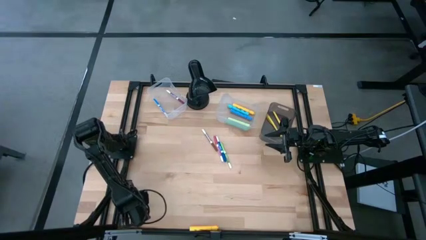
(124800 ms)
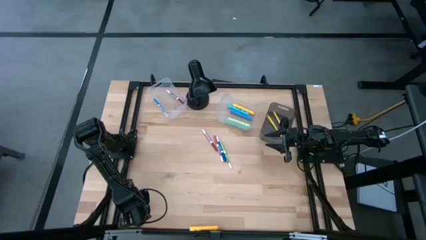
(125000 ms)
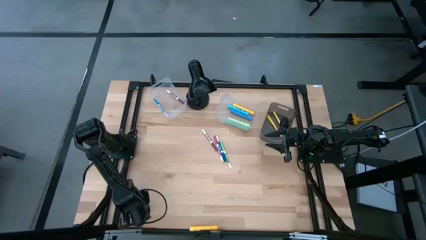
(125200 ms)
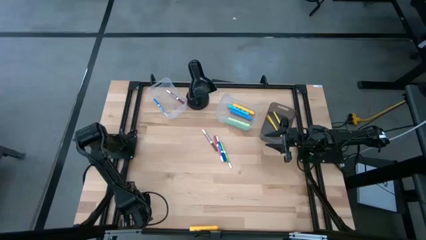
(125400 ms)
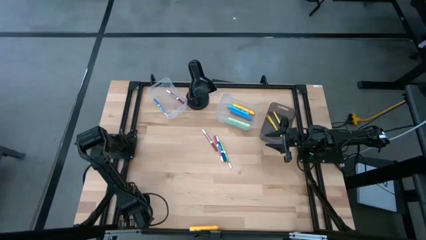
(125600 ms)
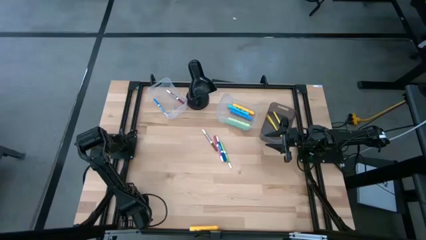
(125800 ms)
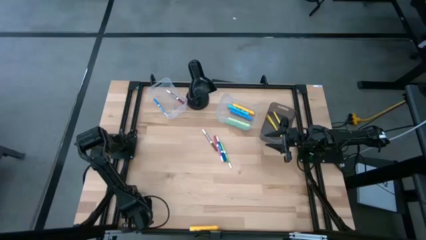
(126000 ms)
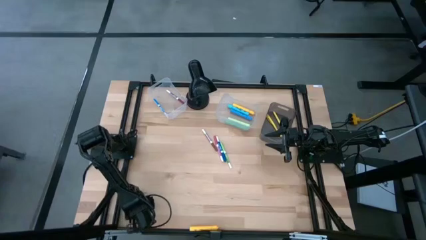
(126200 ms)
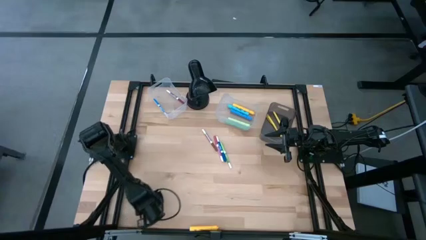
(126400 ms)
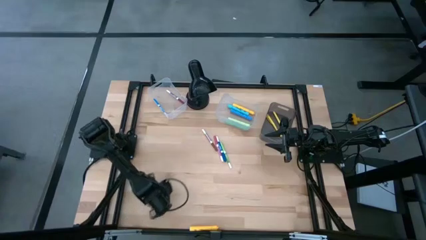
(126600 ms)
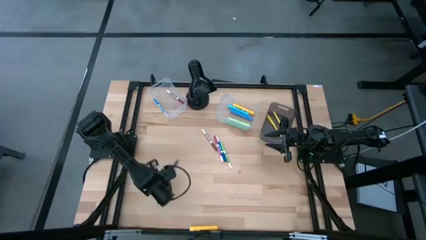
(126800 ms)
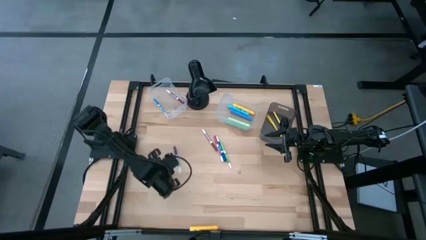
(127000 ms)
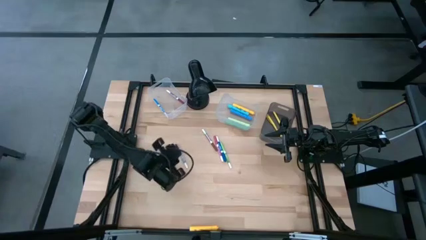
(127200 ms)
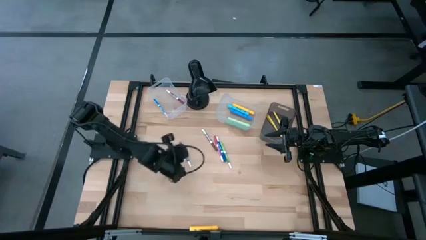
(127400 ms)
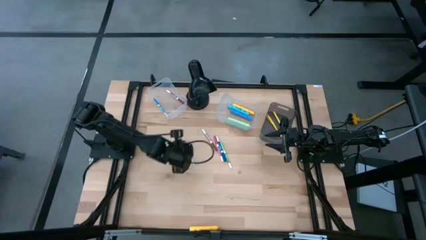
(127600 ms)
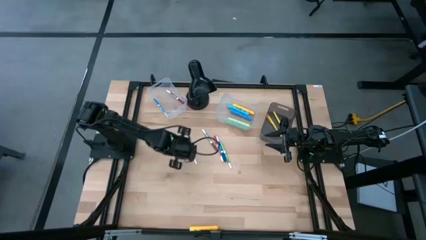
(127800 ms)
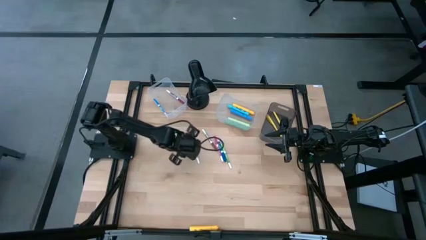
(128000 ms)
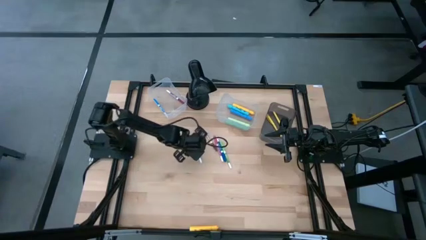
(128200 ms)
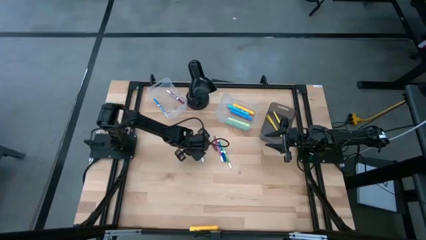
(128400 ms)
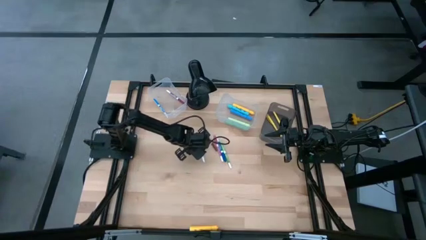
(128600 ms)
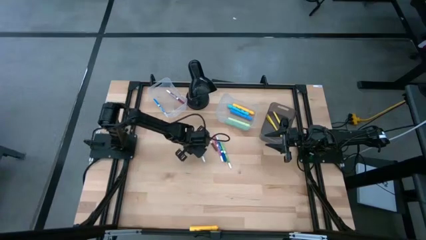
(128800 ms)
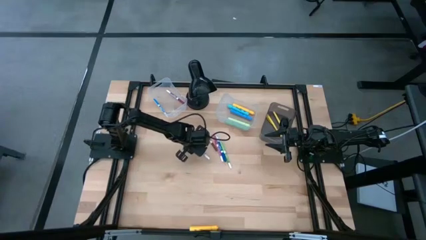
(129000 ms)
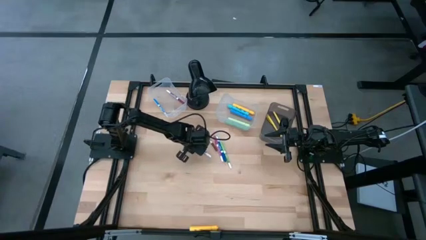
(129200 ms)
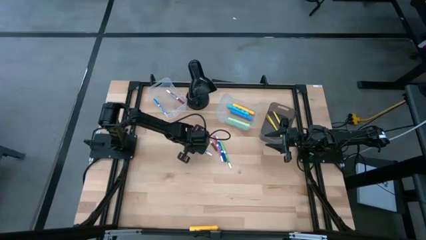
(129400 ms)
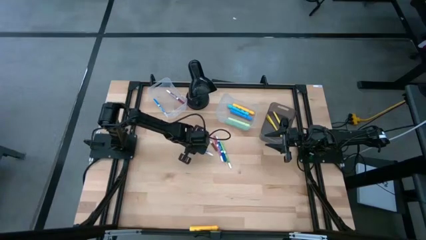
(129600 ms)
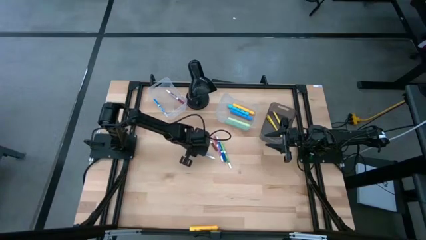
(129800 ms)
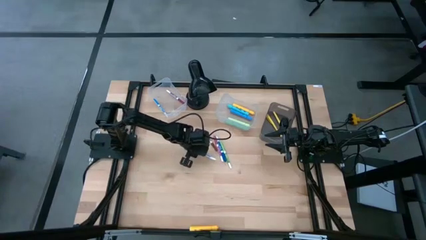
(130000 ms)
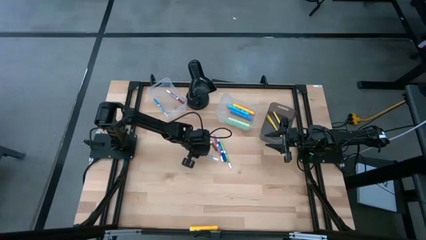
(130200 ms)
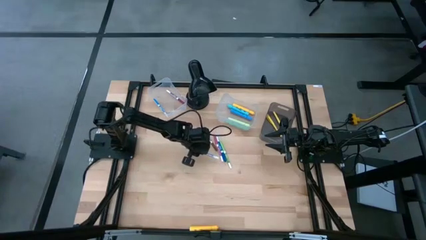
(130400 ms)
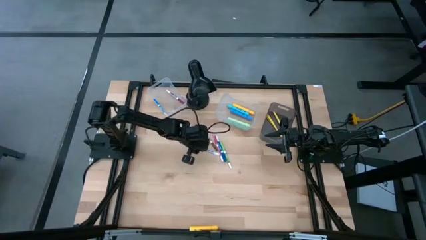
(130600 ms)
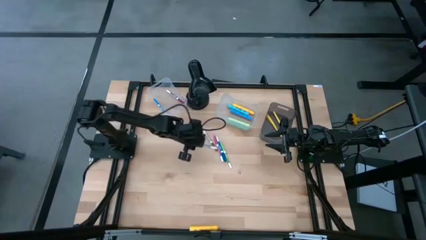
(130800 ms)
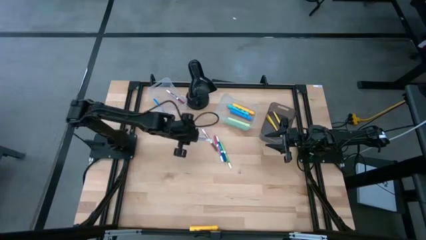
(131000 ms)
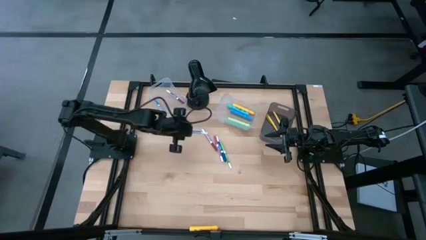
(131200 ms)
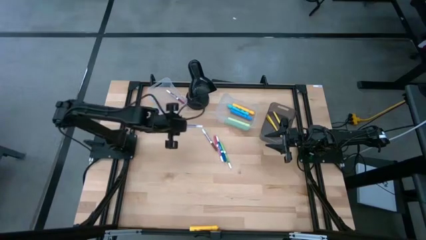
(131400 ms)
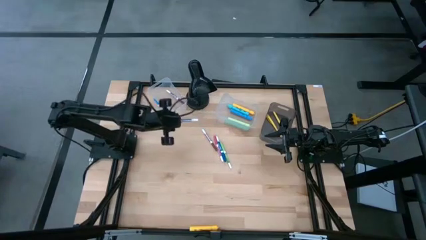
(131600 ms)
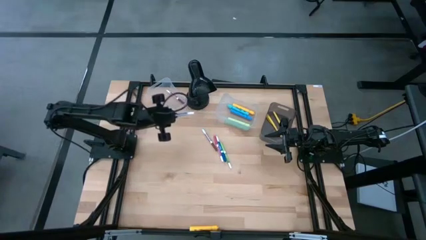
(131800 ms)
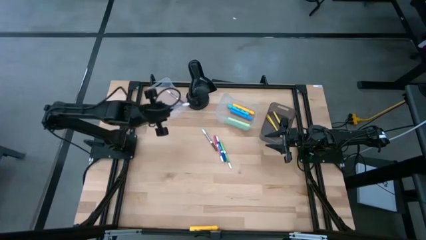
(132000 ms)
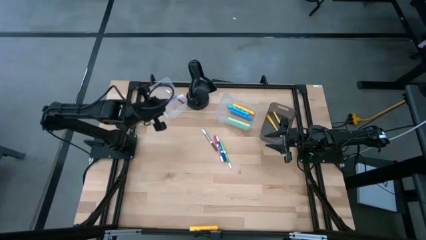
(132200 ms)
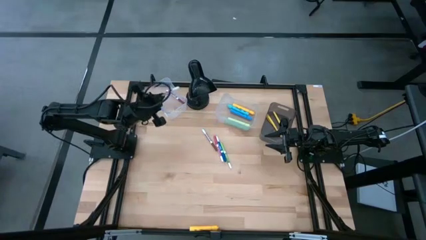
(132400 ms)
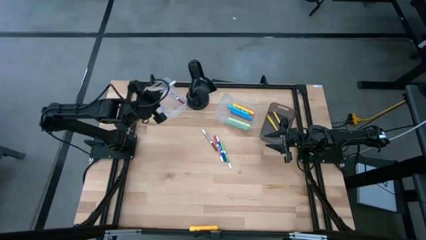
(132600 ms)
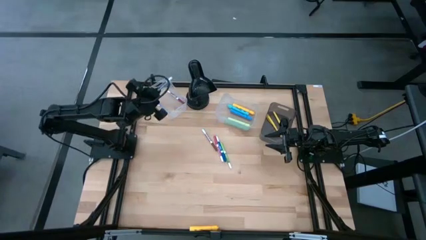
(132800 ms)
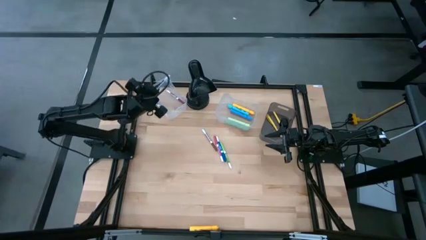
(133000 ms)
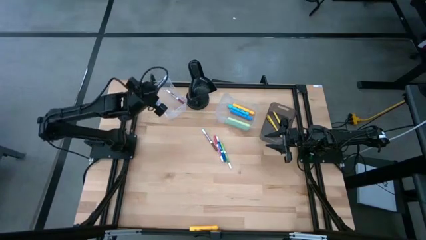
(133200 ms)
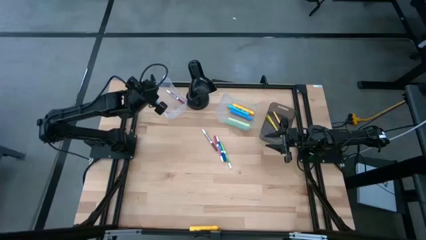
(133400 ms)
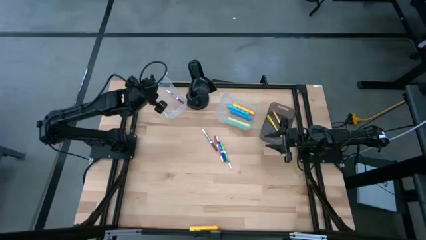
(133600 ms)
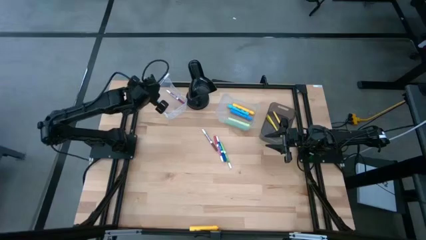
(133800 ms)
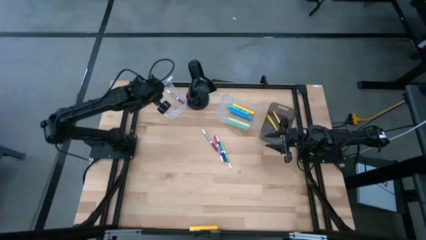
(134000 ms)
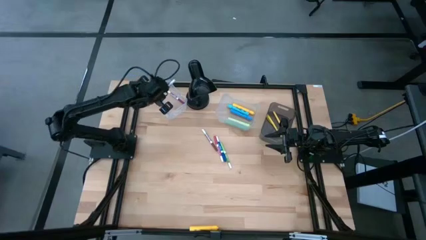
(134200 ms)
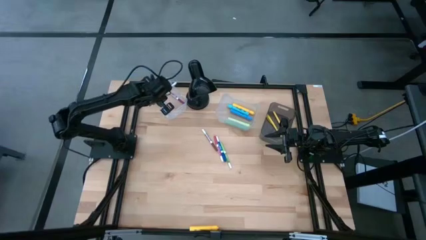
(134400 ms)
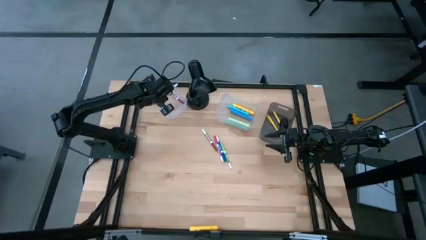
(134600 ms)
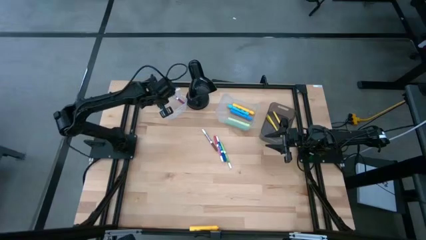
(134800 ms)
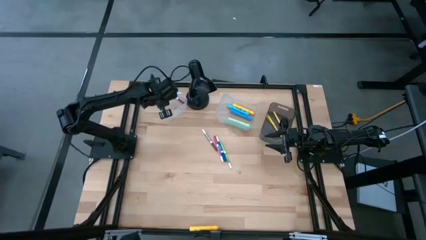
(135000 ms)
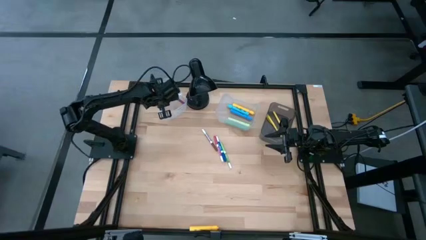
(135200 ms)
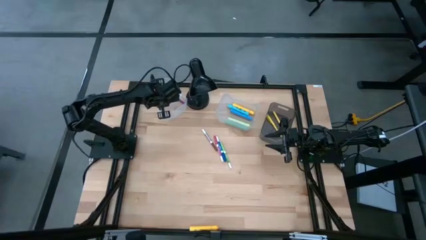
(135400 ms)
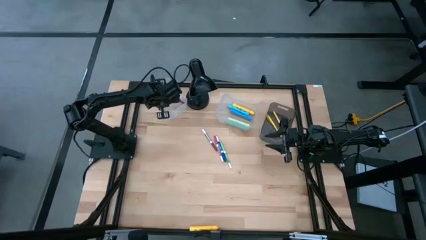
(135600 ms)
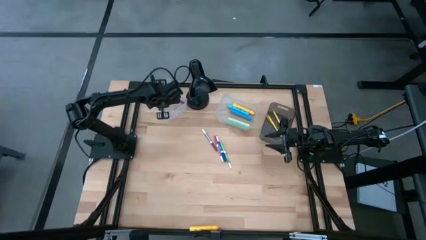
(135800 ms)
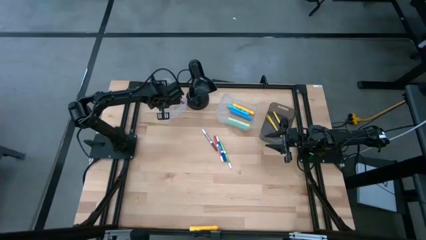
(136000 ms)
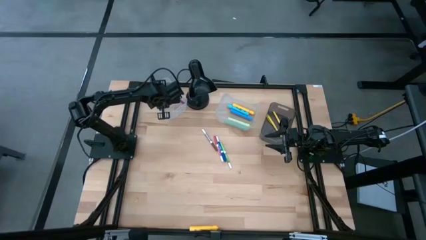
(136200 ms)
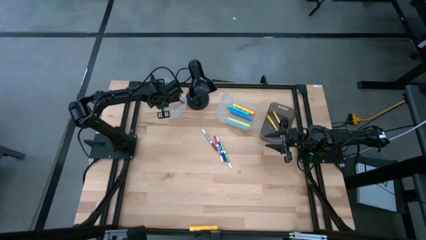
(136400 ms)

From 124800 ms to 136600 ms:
Task: Pick & Place Markers
Put the bottom blue marker in the left transparent bin

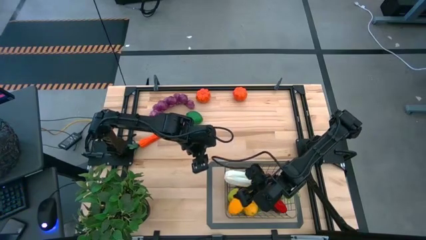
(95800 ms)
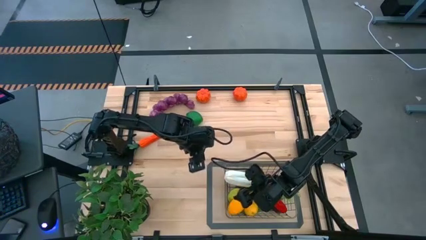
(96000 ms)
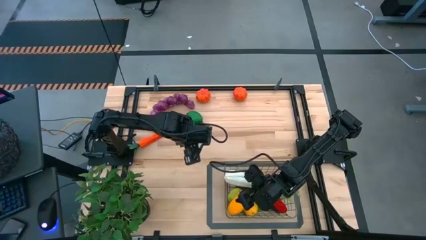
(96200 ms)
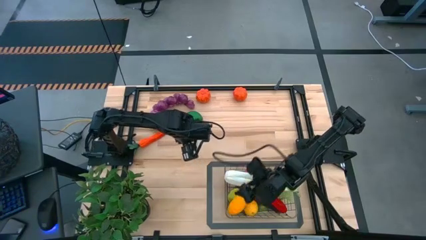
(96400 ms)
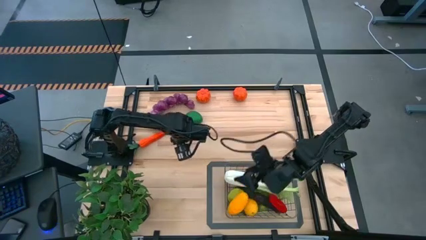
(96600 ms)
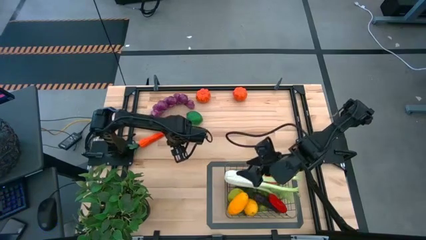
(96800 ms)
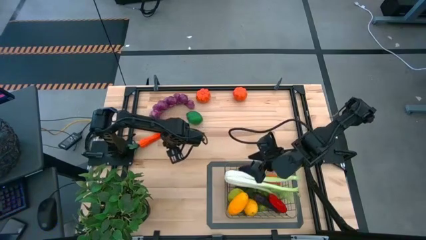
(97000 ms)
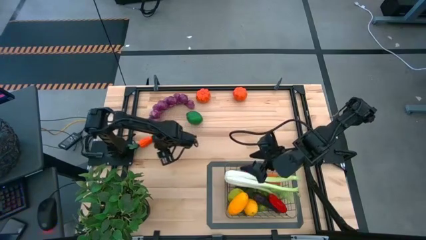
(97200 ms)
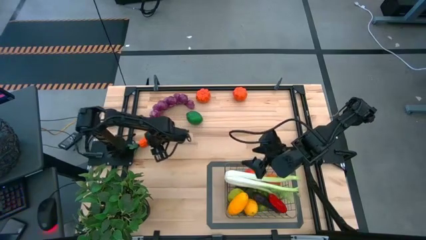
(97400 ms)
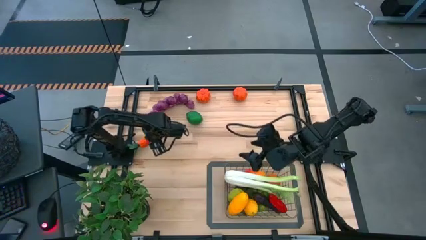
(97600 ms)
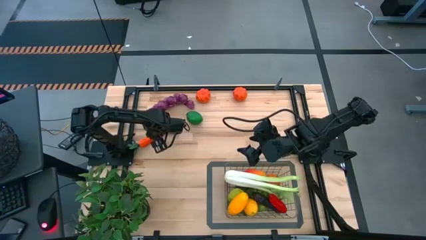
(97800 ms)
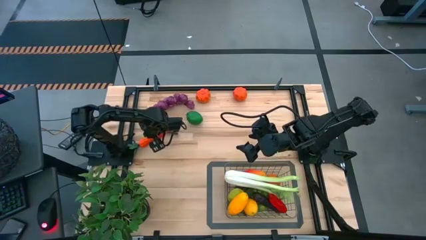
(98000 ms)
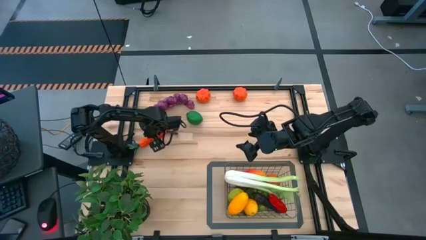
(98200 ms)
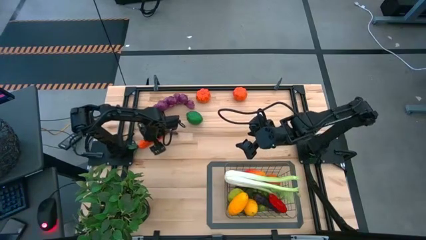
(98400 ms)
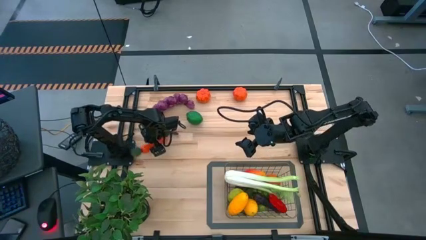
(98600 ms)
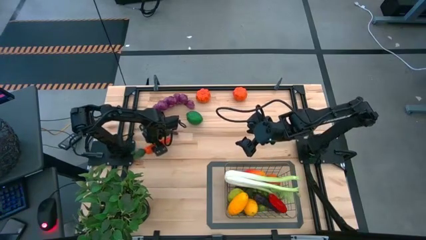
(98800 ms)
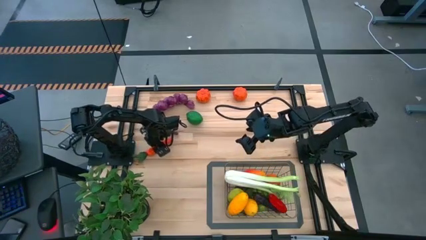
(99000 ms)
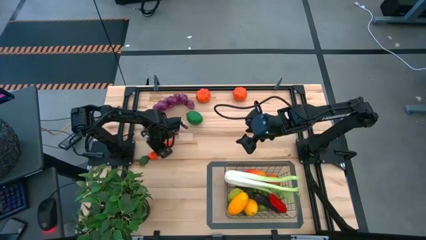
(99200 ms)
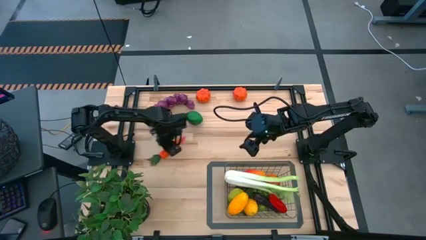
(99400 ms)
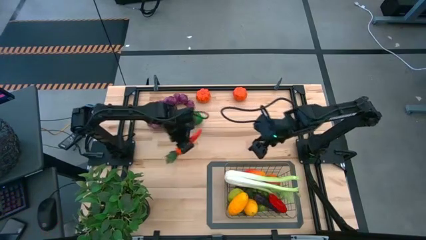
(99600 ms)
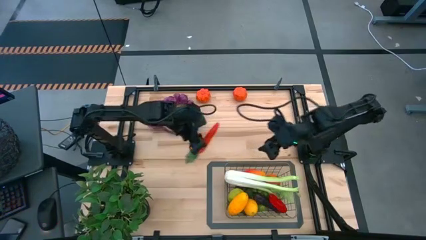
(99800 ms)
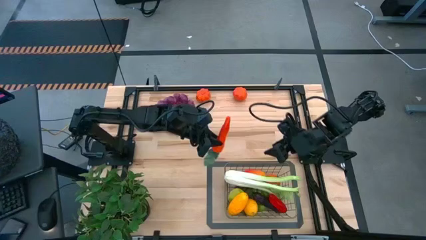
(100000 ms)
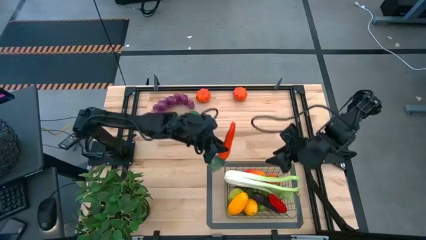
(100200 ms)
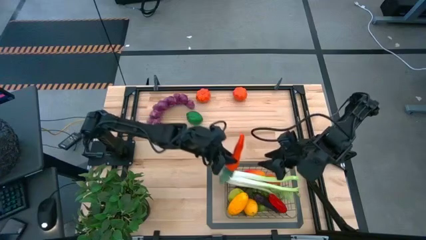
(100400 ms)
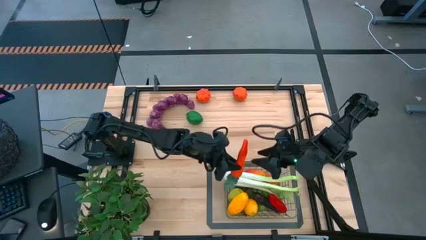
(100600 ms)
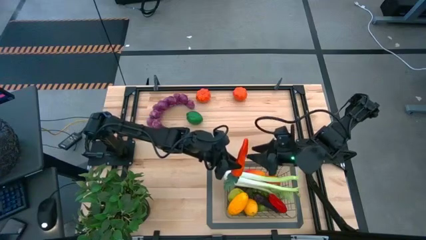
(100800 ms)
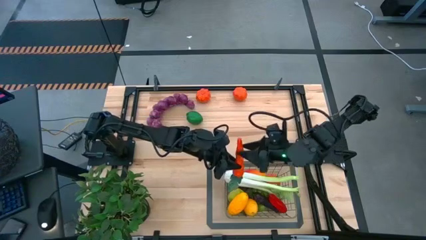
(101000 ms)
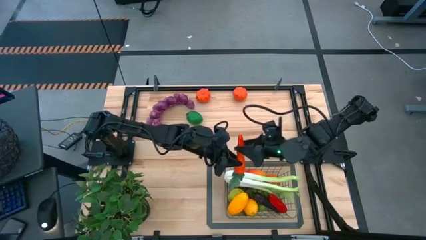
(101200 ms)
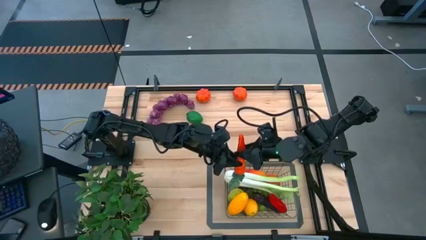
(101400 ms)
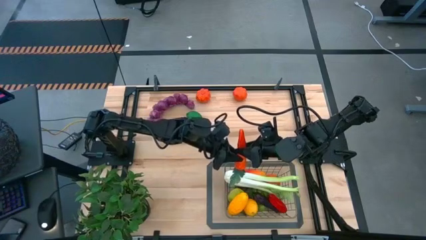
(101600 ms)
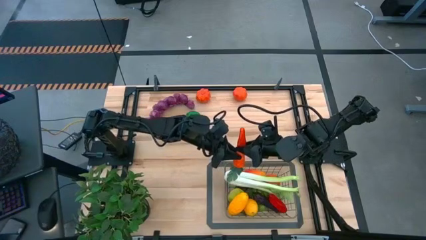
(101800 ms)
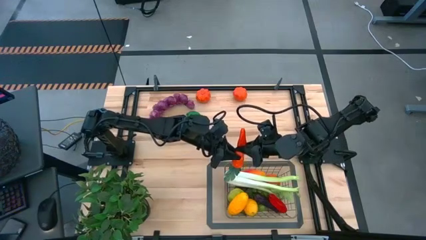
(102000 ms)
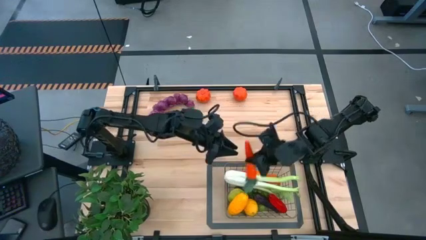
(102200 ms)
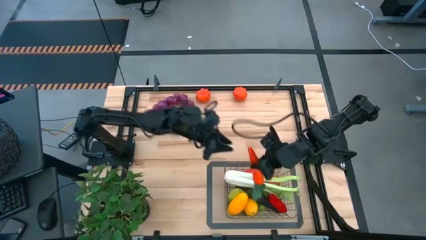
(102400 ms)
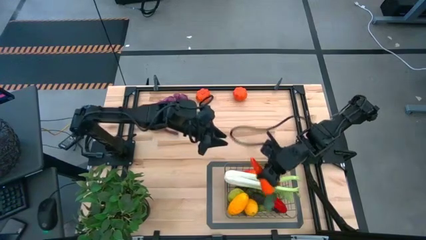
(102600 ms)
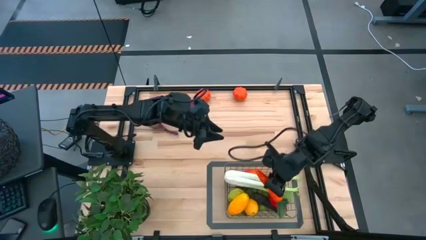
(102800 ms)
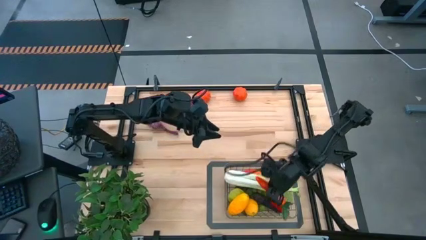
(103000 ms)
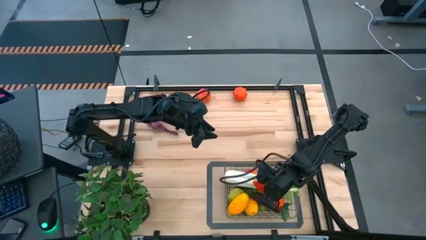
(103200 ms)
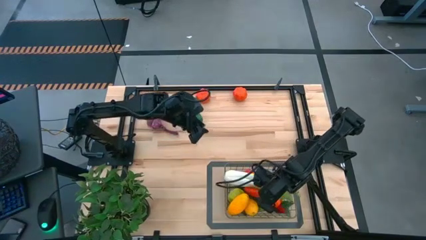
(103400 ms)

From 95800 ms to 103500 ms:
Task: Build produce basket
Put the carrot into the wire basket
